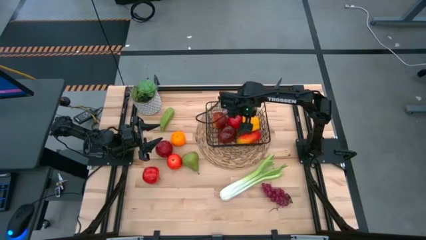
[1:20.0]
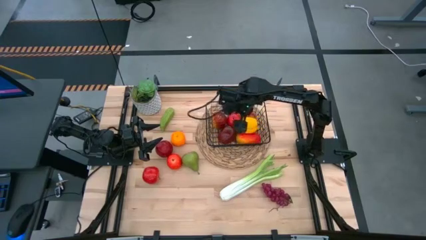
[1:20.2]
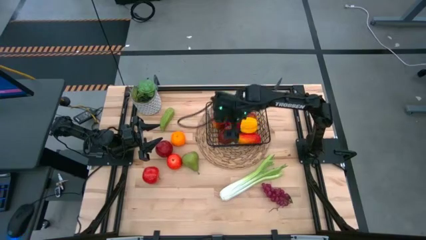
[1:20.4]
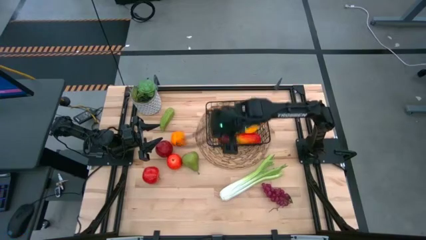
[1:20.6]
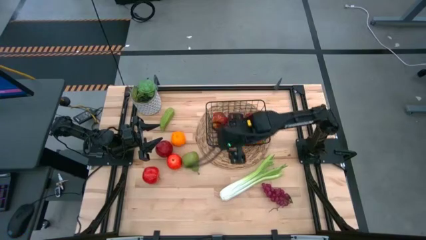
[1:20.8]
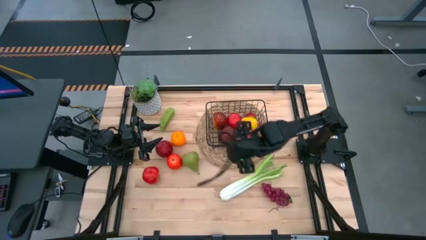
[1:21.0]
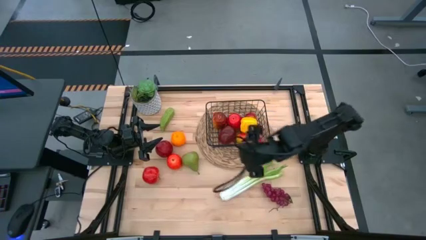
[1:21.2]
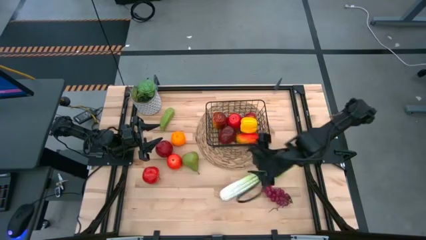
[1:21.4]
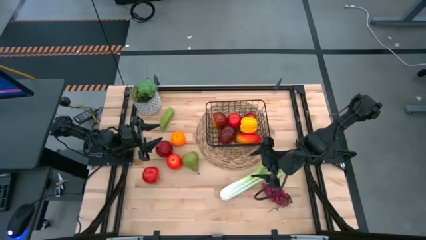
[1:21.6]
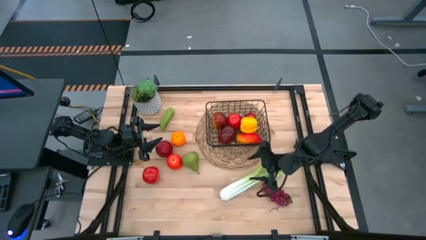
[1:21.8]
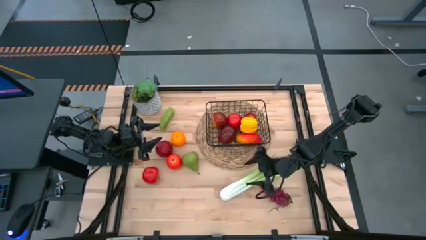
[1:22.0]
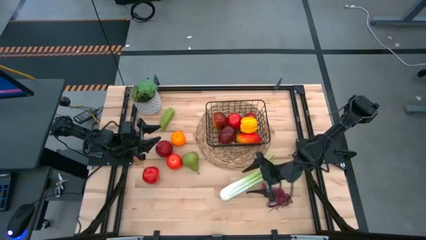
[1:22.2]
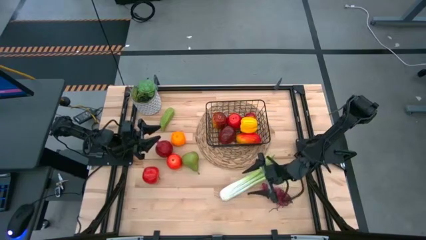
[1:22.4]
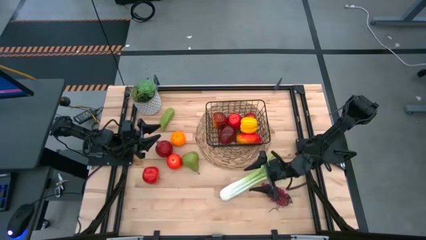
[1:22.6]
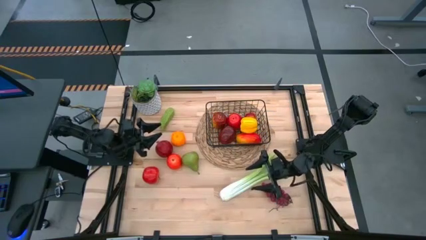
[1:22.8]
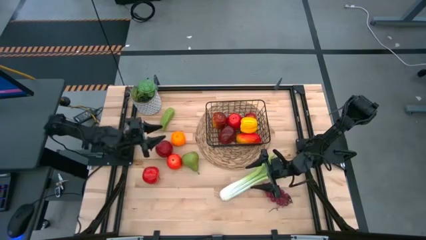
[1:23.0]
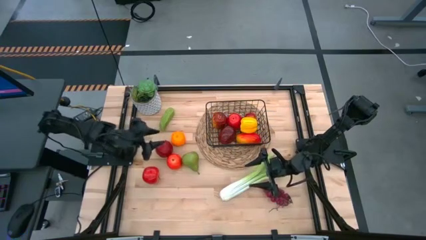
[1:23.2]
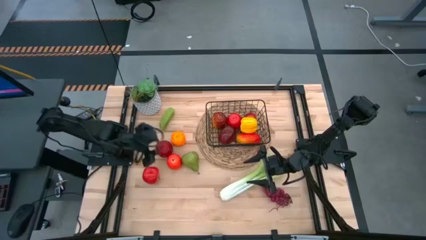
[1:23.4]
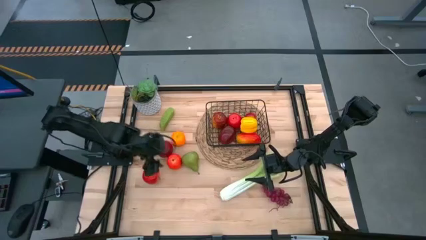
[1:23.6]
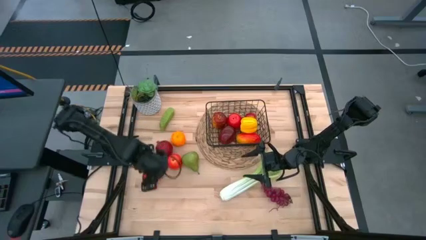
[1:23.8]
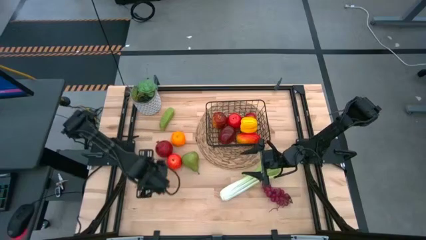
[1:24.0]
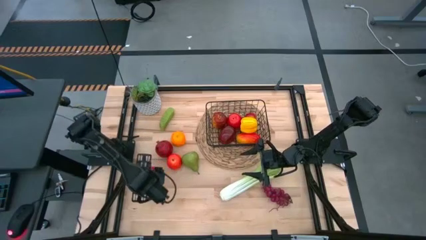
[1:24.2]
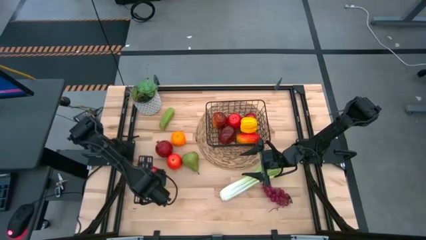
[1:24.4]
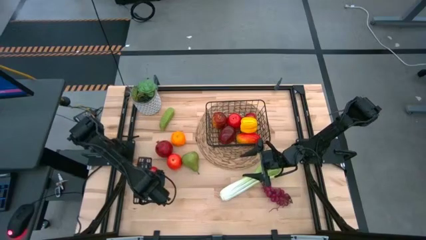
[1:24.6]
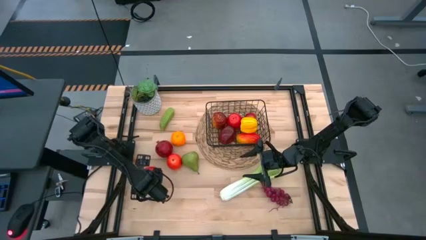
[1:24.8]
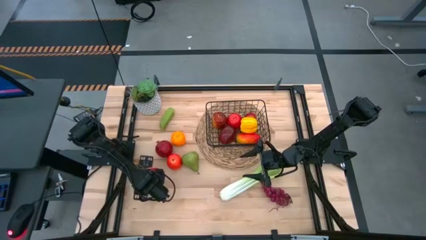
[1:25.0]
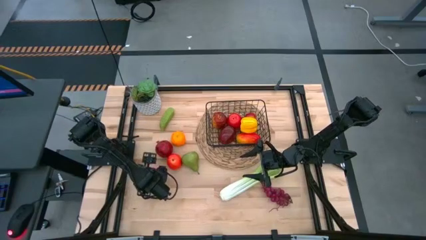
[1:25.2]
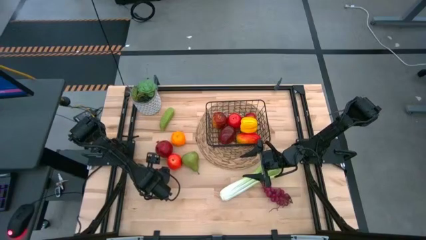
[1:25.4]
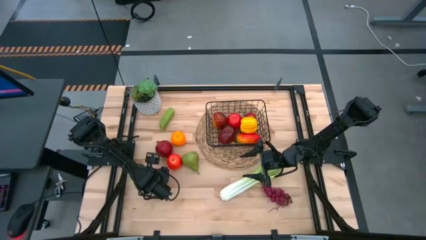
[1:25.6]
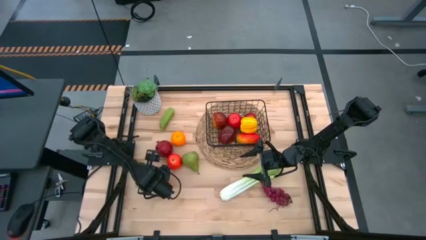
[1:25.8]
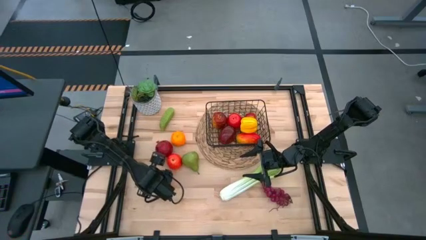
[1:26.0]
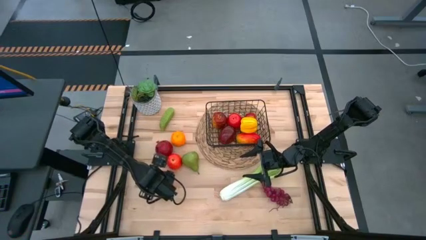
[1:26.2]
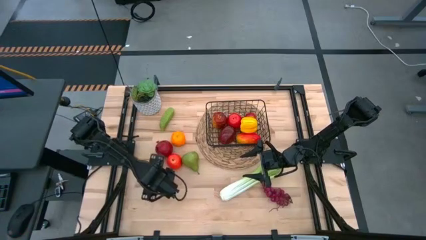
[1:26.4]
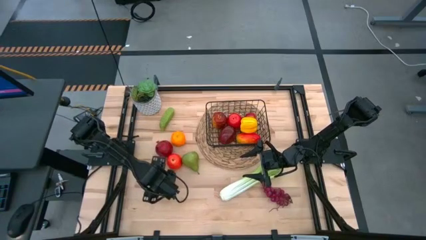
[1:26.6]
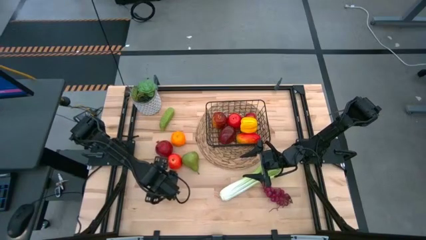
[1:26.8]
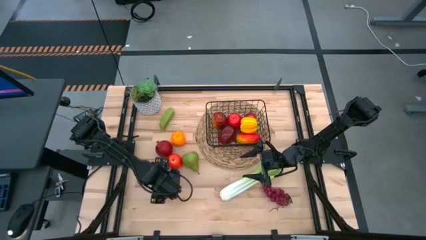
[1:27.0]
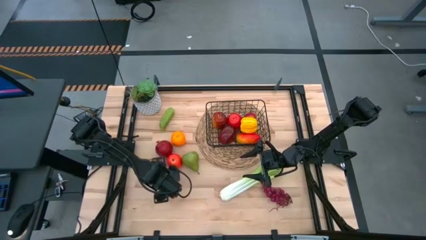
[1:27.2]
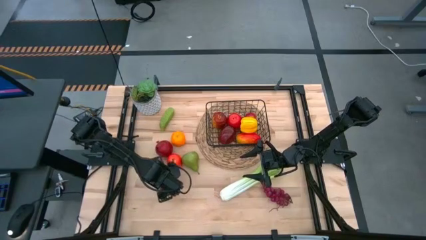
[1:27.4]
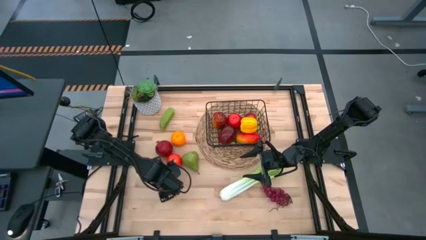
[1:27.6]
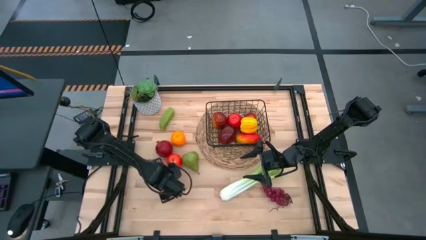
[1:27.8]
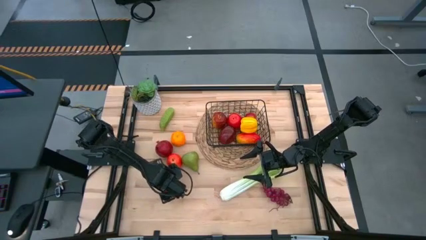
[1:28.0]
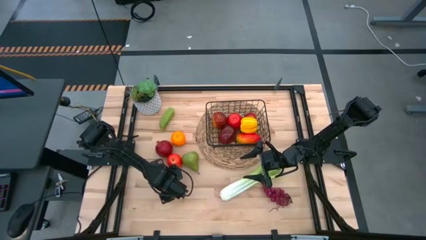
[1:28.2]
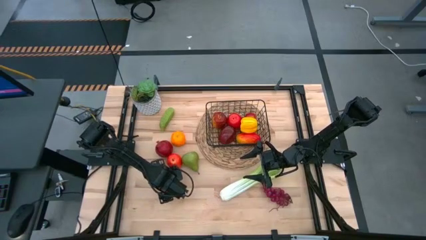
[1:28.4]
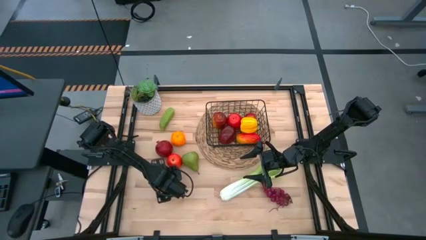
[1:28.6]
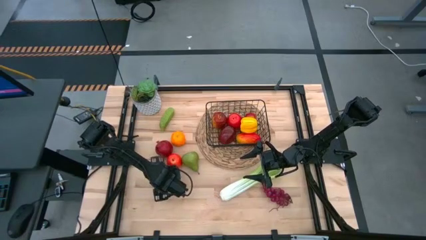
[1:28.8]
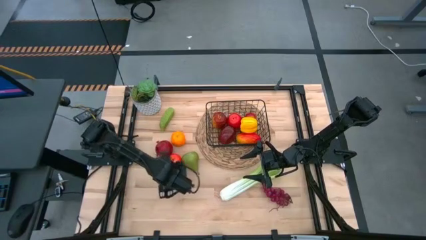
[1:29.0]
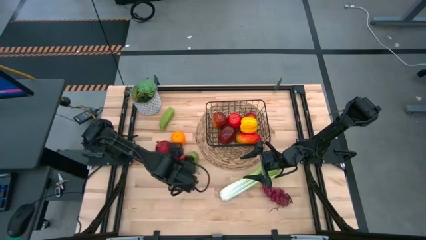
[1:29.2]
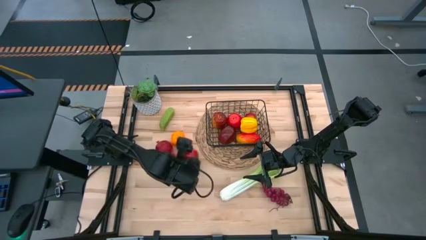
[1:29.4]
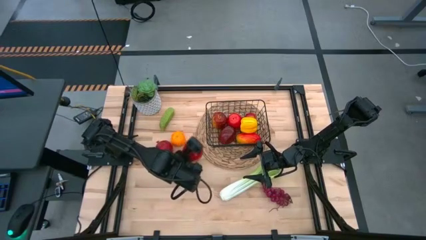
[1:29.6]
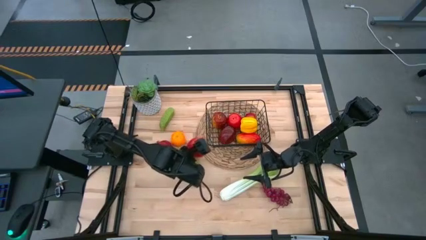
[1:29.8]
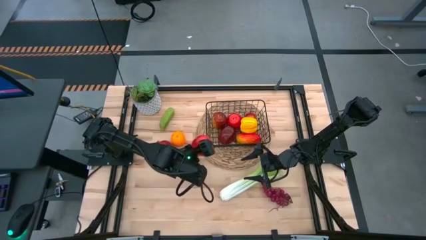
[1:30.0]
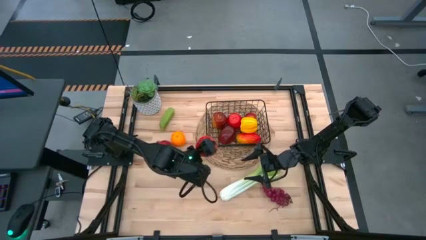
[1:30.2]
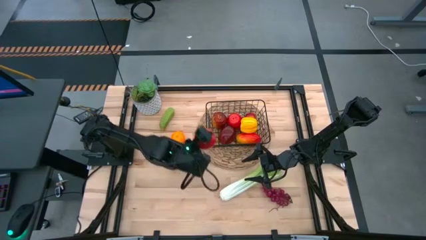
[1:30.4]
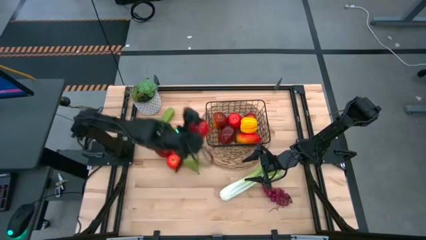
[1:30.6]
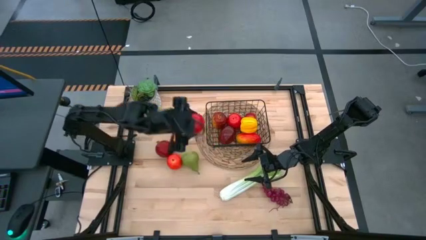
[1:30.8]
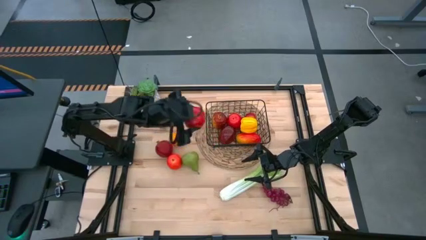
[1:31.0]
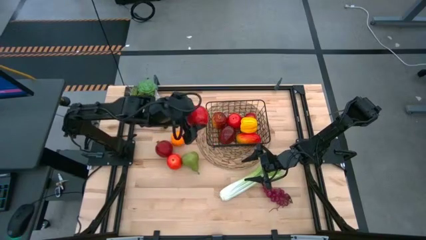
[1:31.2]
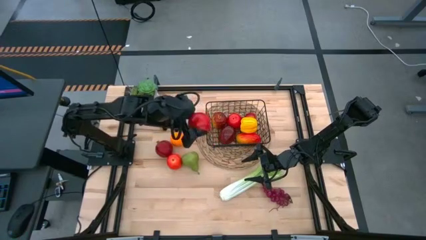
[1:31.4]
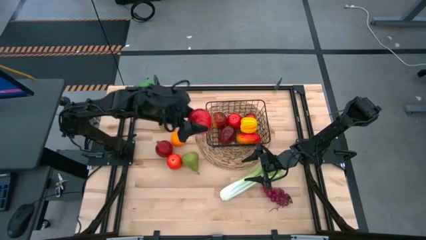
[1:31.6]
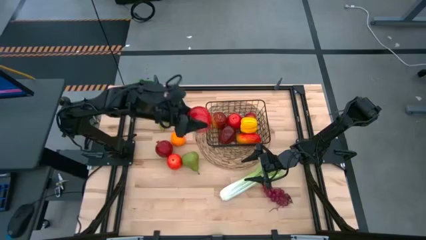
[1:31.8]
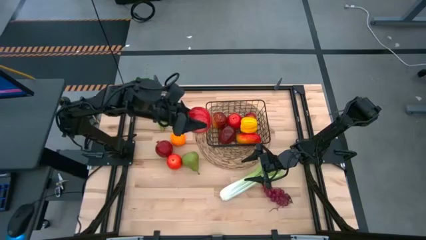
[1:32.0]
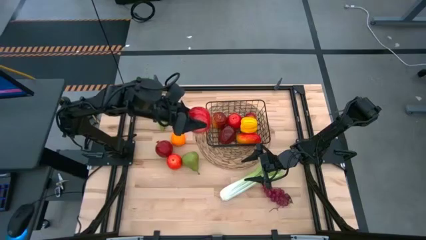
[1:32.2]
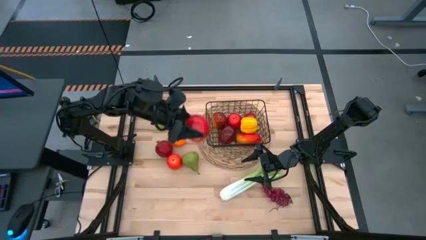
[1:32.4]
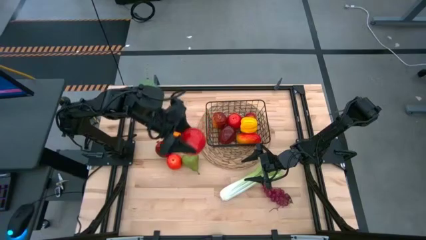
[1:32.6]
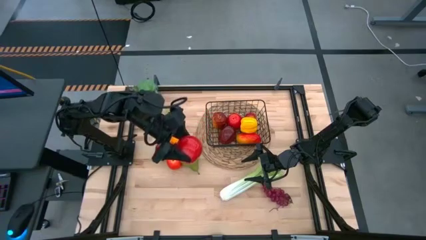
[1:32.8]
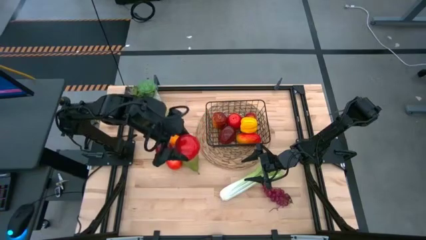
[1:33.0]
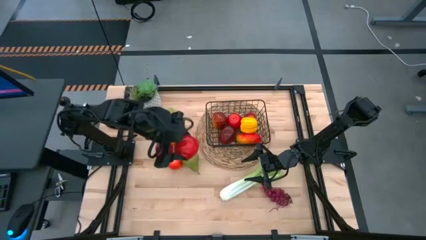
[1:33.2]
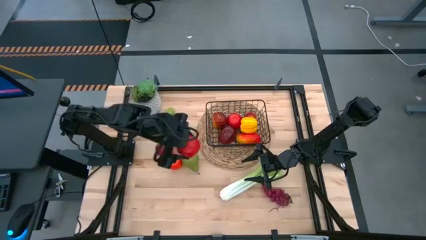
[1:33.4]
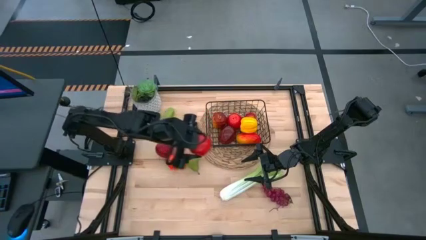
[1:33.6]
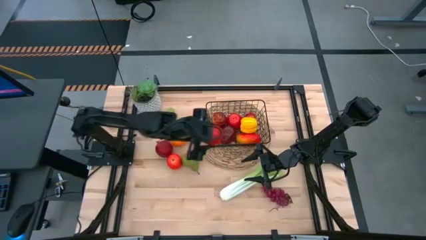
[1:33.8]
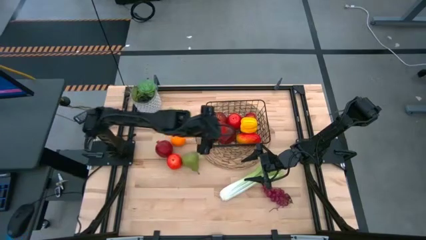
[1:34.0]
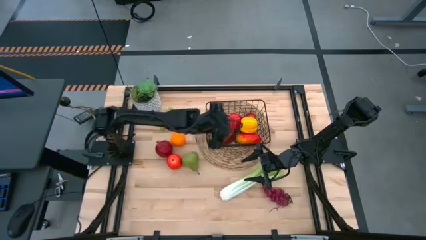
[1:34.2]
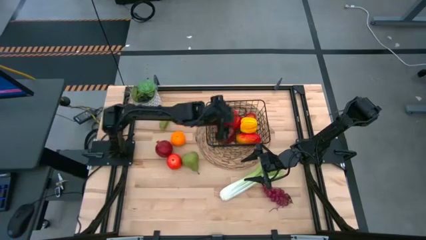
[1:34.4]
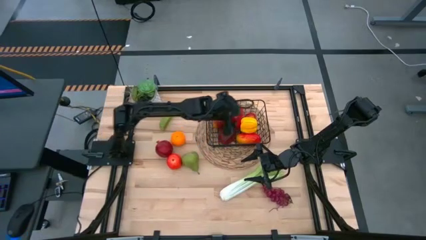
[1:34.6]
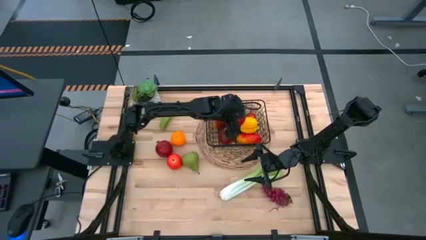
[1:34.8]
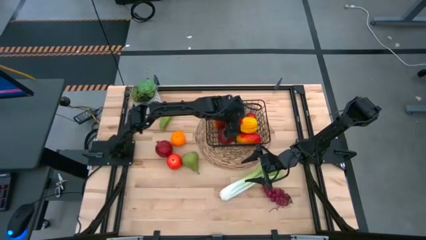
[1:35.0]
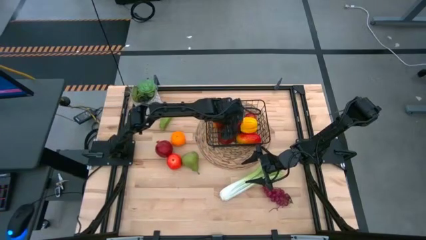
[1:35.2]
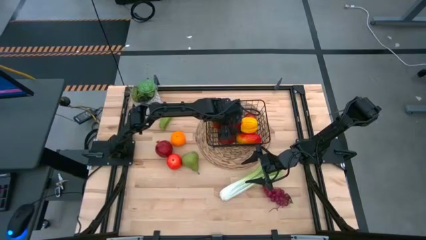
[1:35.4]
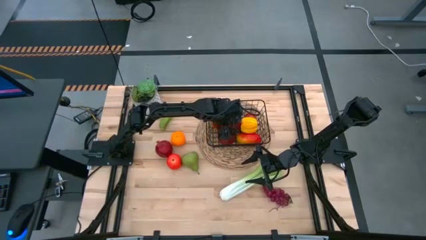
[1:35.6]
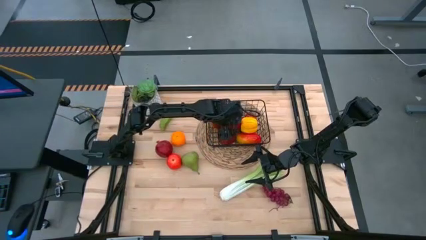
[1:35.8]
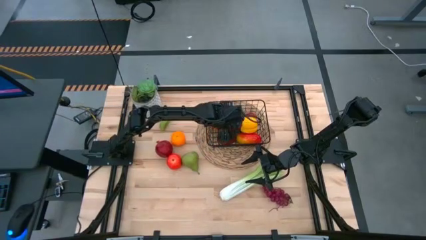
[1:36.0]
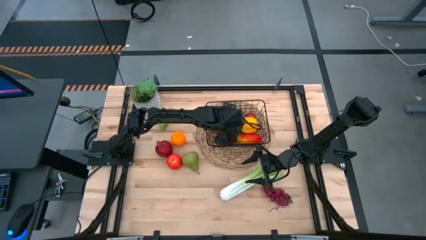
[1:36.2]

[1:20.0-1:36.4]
Task: Build produce basket
Put the red apple into the black wire basket

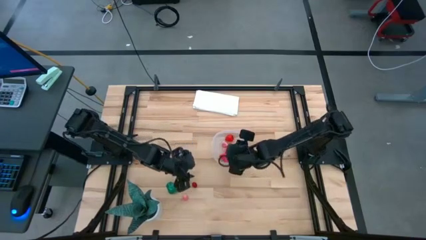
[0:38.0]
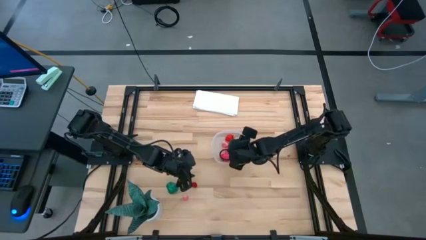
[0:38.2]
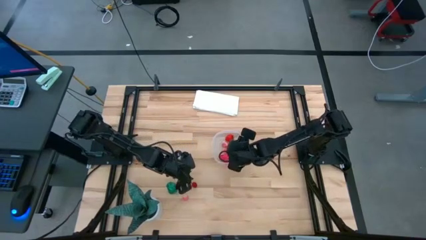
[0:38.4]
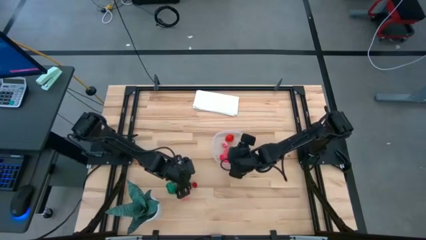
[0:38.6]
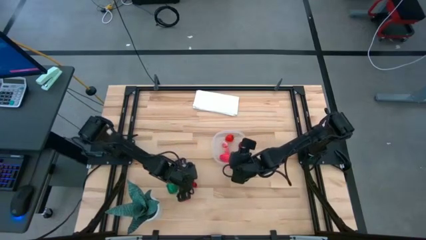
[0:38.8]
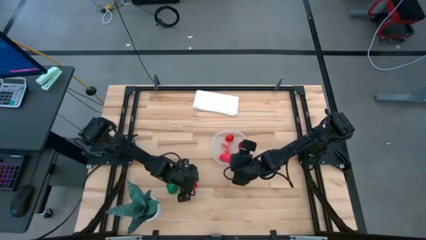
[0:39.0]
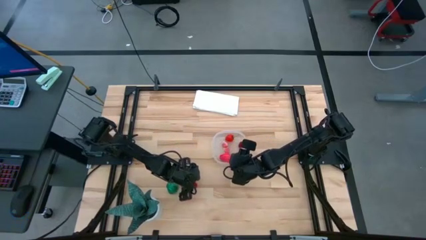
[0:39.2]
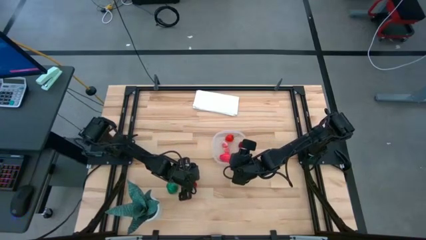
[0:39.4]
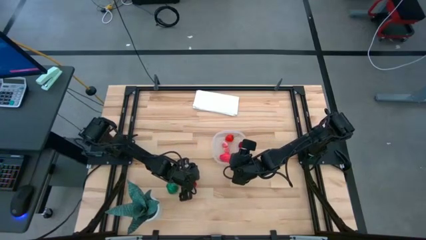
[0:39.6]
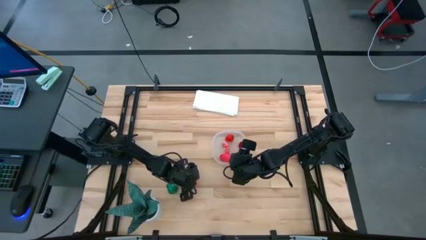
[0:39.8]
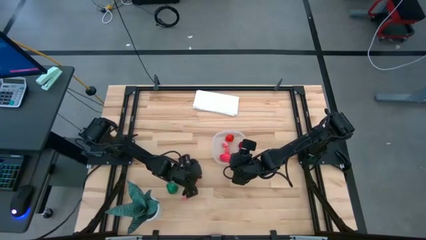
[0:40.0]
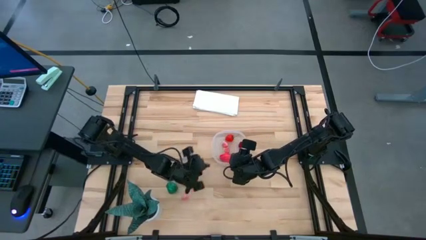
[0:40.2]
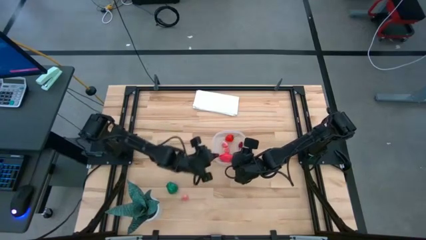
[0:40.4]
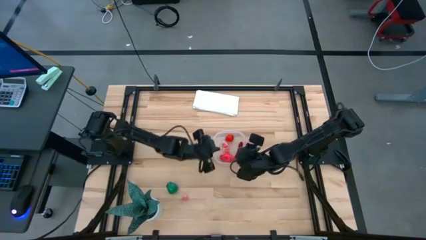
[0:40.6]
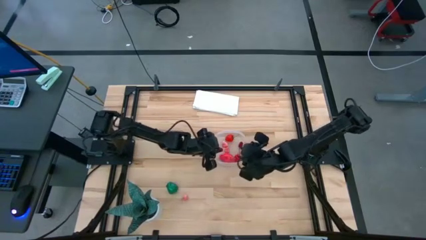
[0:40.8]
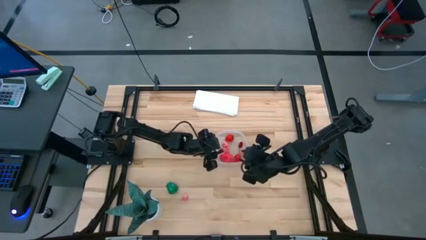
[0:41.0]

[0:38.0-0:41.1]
Task: Pick and placing Produce into tupperware
Put the red into the transparent bin
